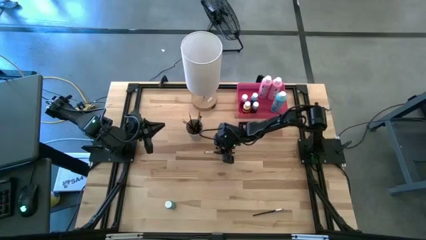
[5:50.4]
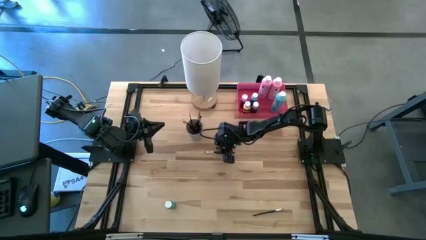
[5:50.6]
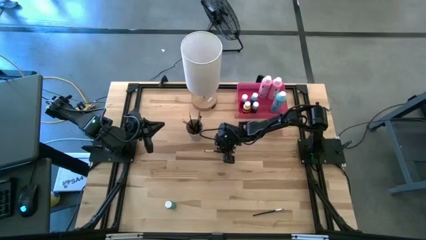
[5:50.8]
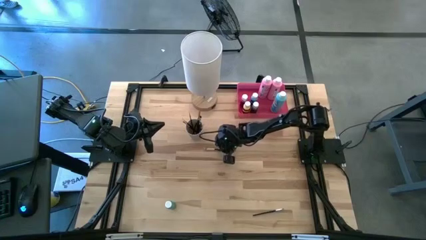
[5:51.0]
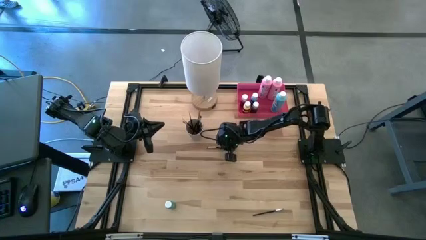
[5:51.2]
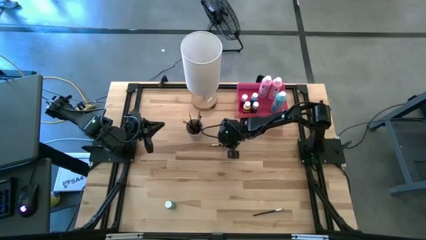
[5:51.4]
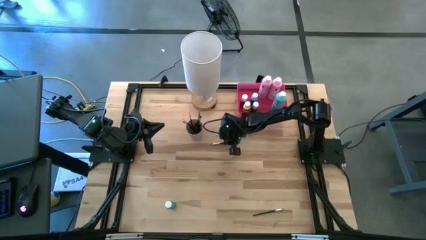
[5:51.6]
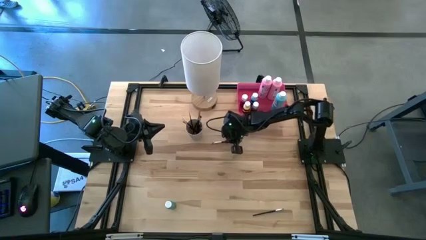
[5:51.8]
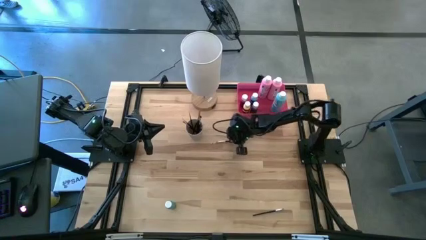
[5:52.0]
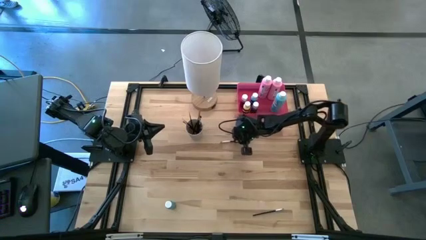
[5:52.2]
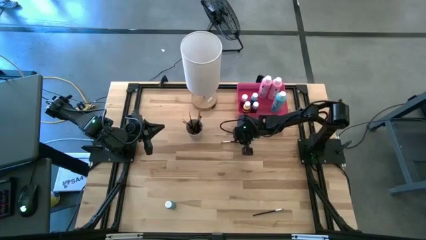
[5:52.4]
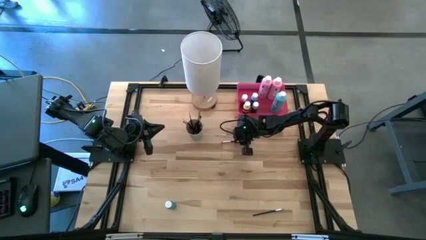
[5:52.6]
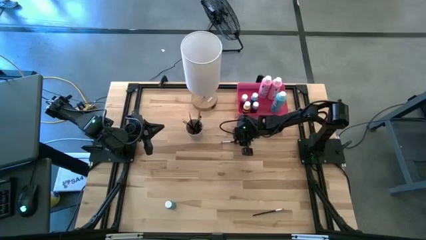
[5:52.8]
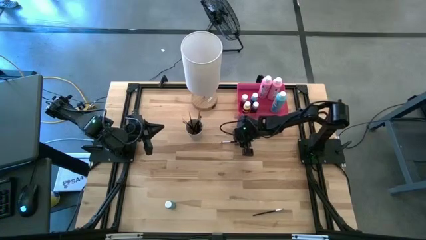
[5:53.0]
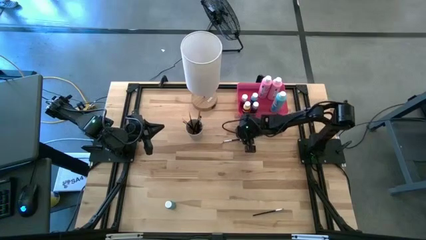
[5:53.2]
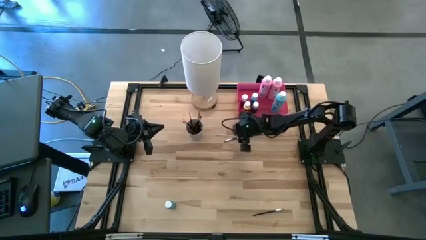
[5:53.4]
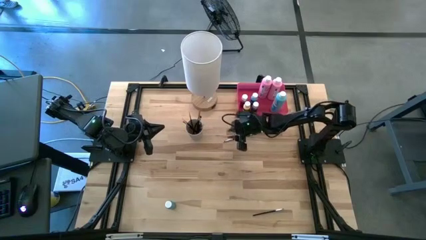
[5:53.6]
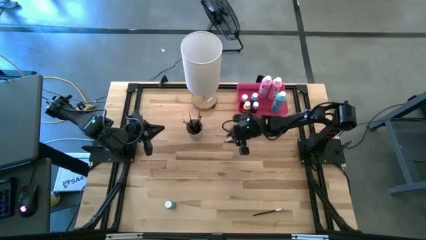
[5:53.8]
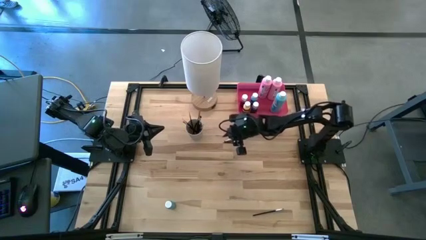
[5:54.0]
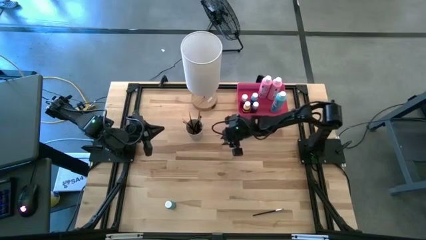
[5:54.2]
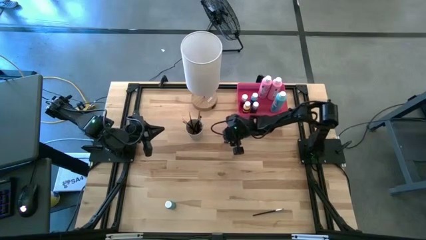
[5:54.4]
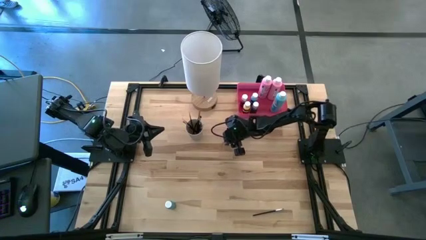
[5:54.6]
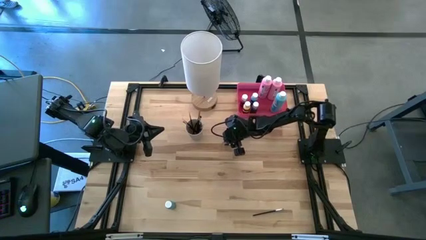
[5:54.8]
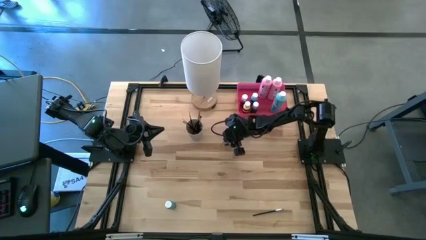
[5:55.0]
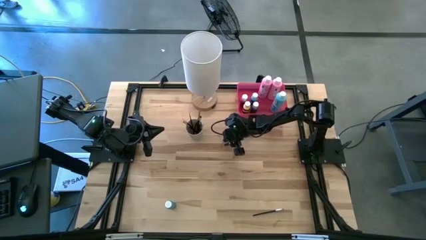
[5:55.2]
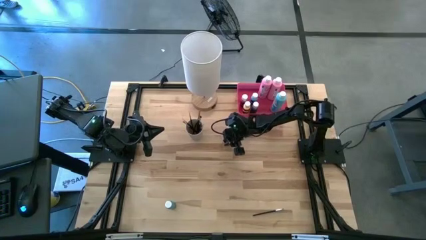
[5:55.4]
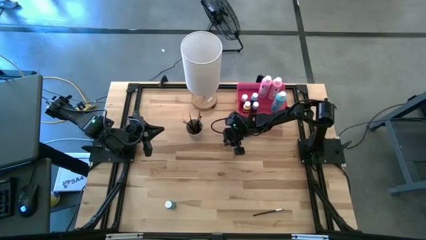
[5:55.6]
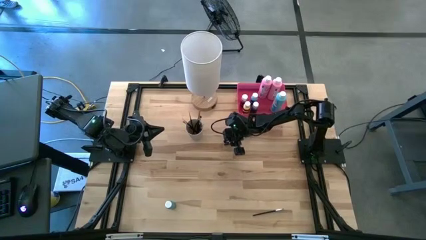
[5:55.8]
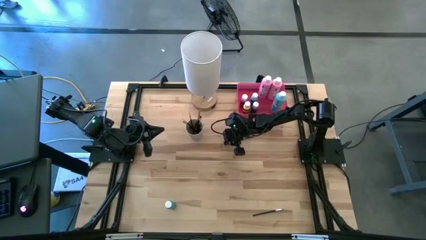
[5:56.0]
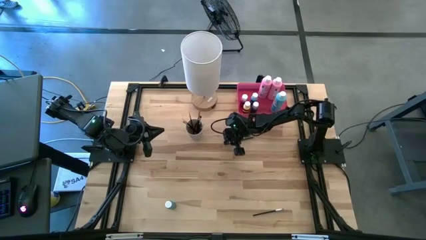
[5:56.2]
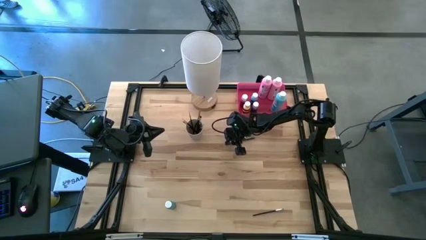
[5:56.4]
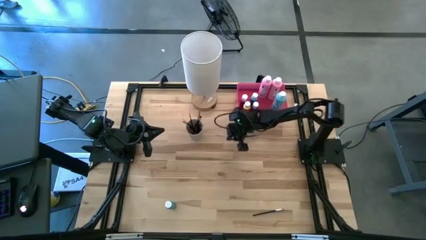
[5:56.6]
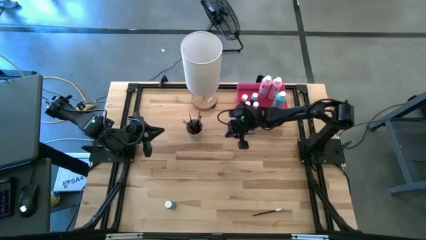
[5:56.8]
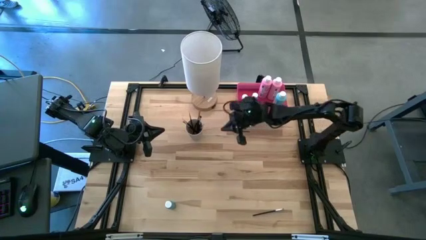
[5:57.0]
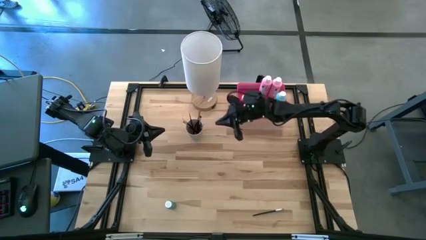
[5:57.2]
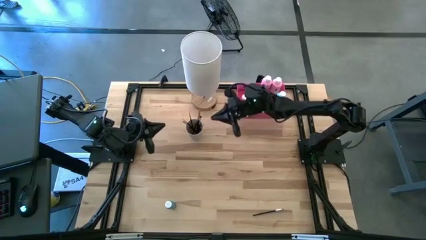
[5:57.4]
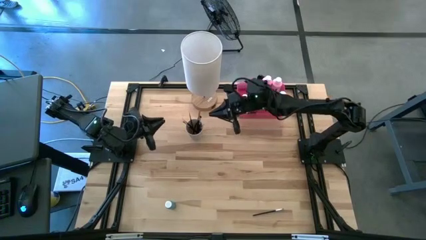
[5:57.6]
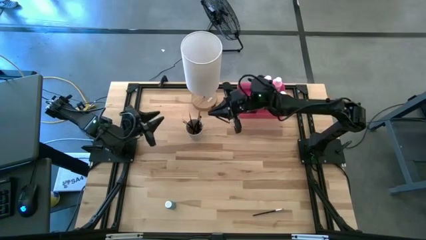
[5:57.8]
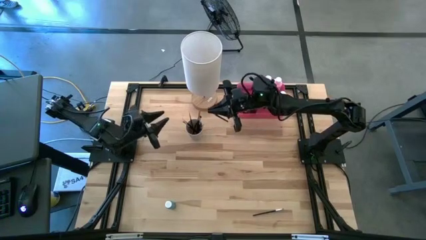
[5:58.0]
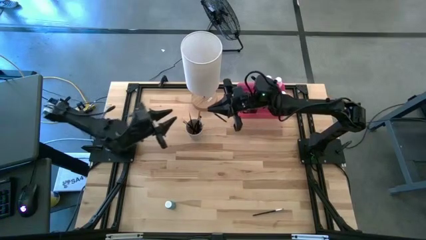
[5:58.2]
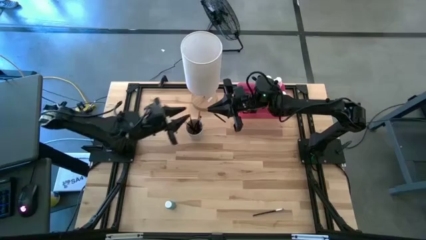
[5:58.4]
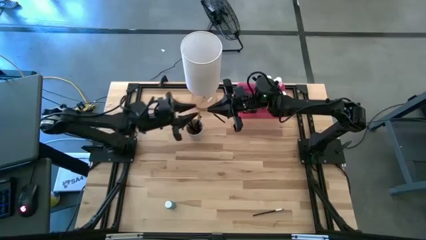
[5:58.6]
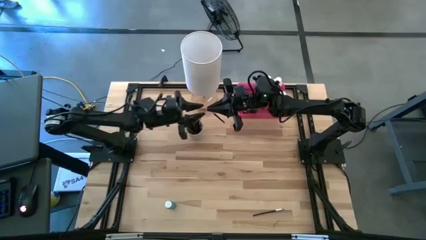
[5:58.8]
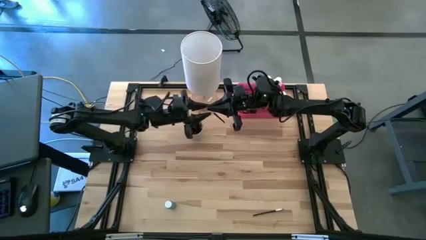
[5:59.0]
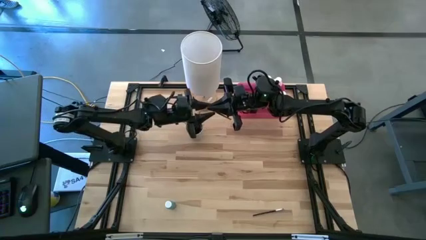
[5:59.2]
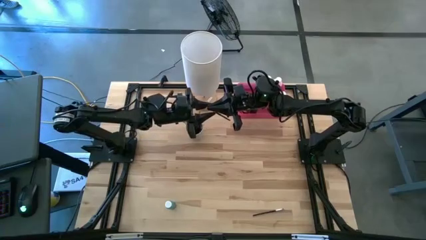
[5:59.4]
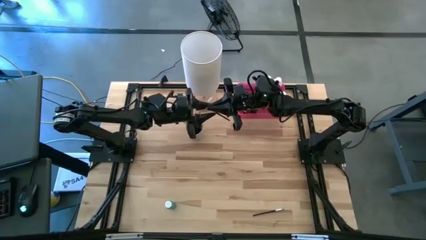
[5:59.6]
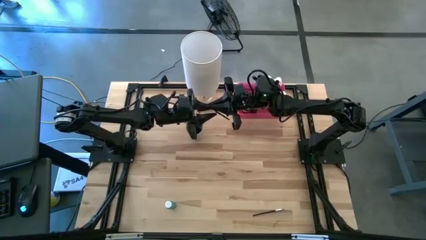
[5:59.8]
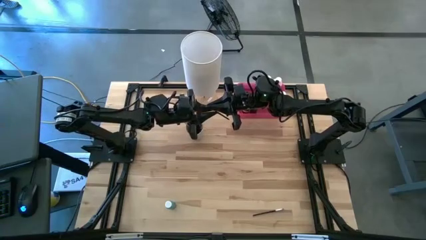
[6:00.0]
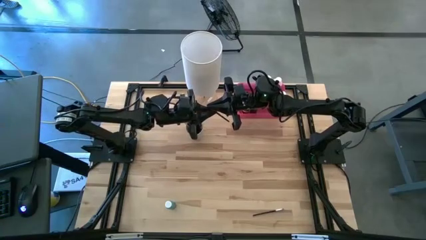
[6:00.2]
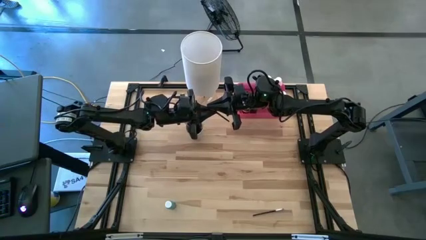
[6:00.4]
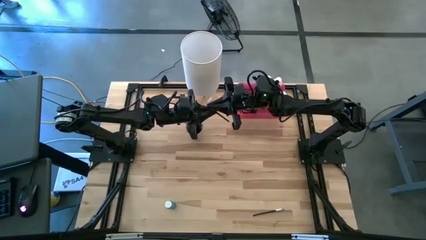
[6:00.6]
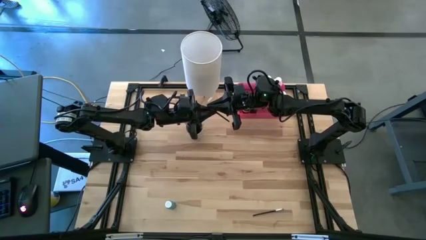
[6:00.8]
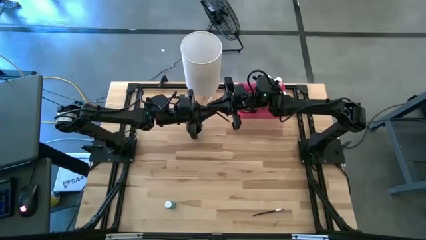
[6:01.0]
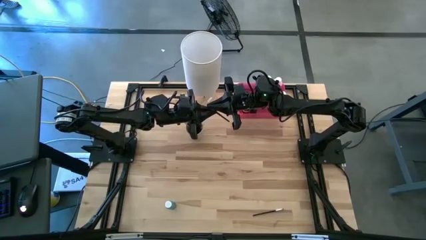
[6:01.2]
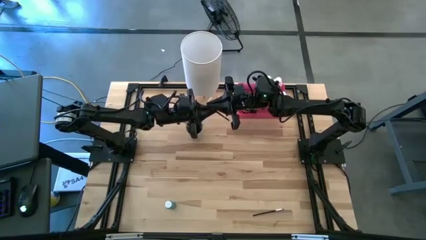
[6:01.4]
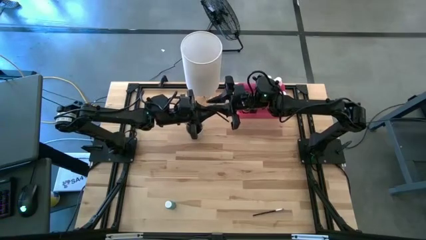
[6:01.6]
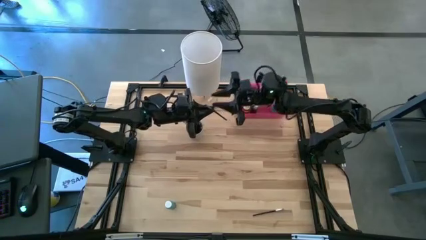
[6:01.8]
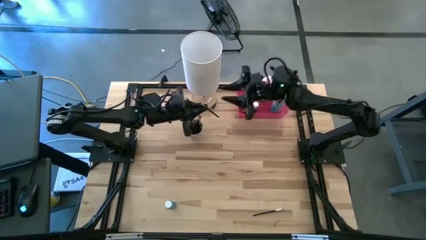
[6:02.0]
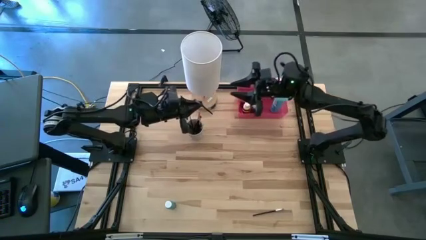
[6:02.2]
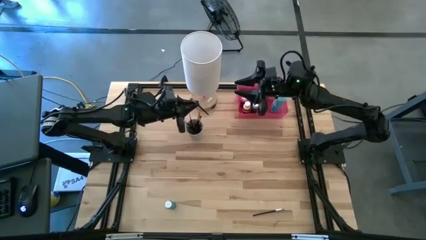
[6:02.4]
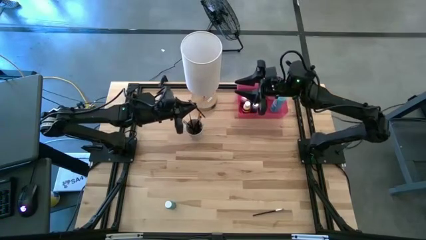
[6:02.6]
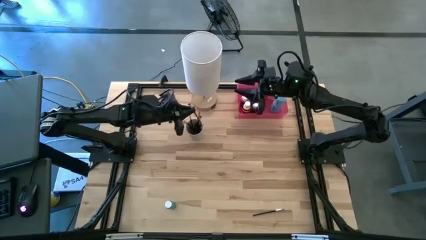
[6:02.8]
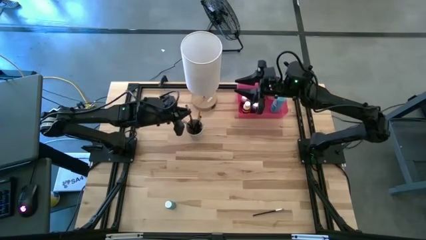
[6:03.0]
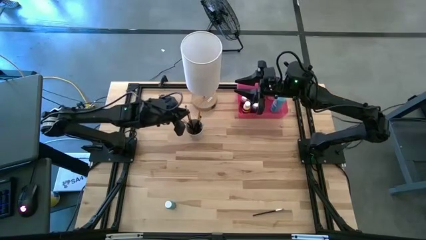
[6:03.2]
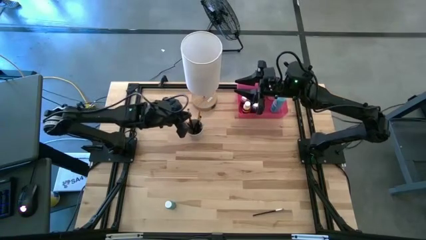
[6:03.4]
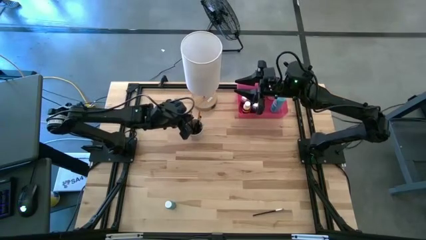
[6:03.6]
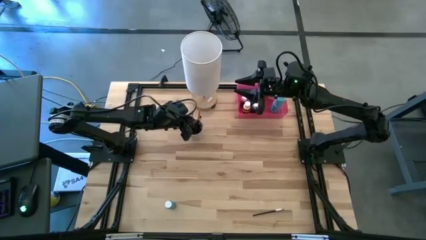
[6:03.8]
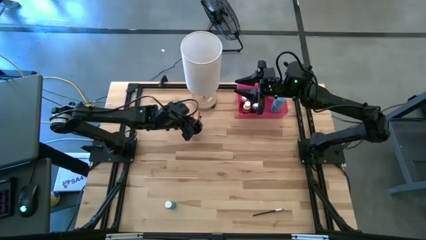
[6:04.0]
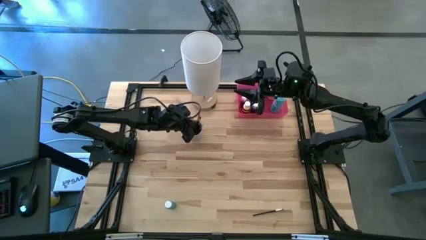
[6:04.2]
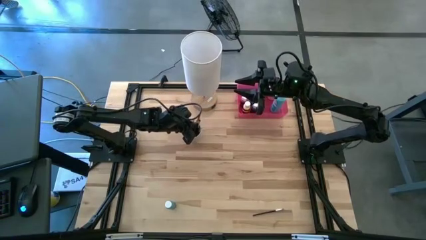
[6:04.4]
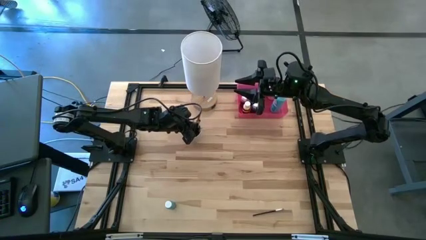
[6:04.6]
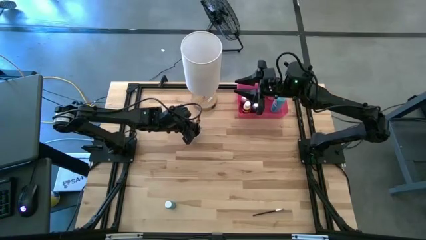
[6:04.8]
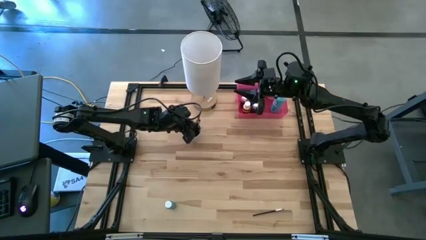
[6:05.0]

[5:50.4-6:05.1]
Task: Pick & Place Paint Supplies
Put the silver eyeshadow brush into the white cup
